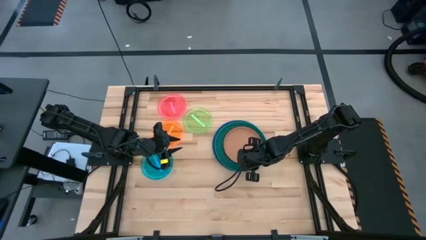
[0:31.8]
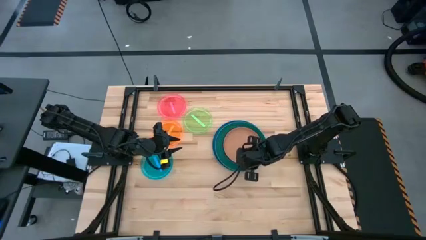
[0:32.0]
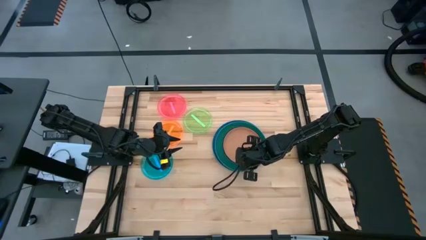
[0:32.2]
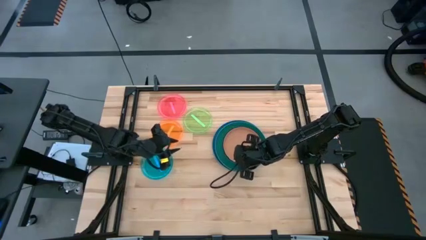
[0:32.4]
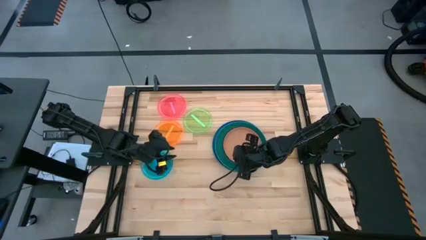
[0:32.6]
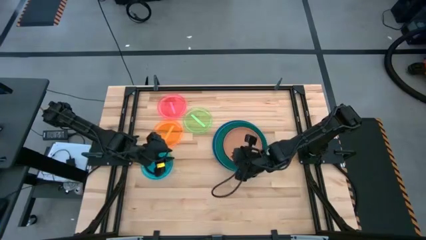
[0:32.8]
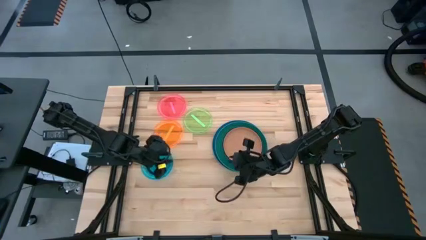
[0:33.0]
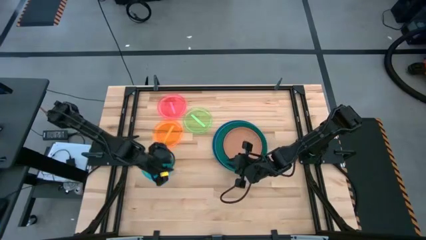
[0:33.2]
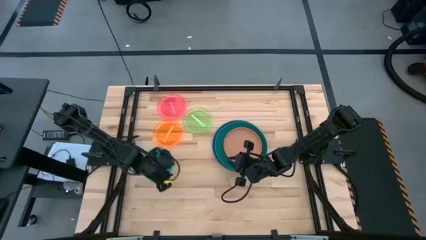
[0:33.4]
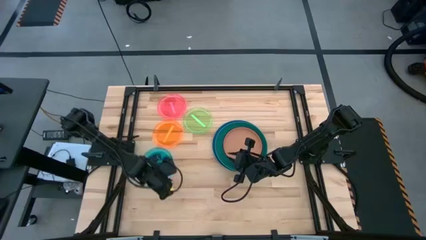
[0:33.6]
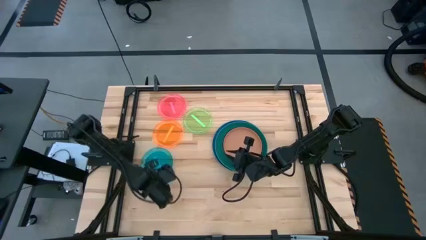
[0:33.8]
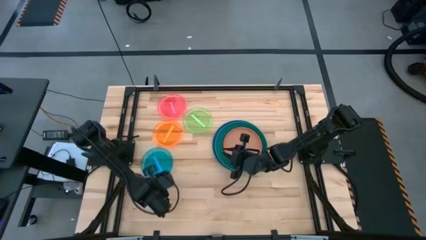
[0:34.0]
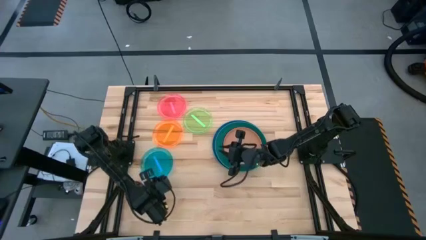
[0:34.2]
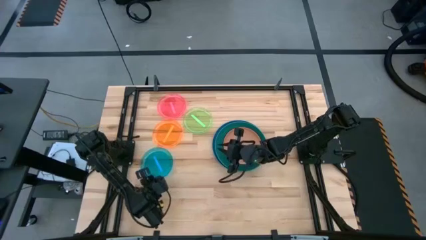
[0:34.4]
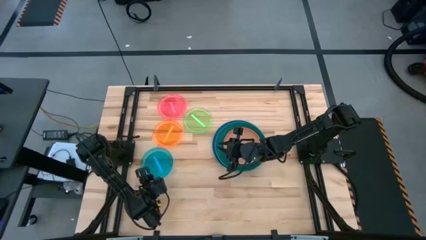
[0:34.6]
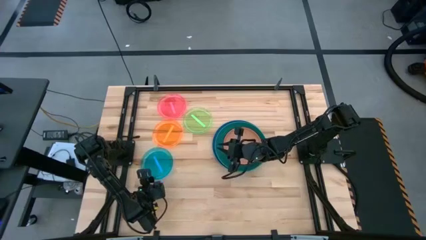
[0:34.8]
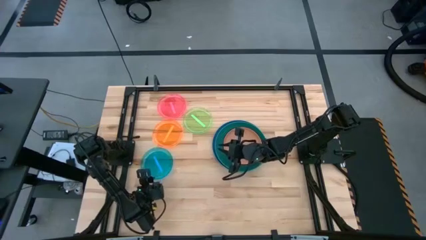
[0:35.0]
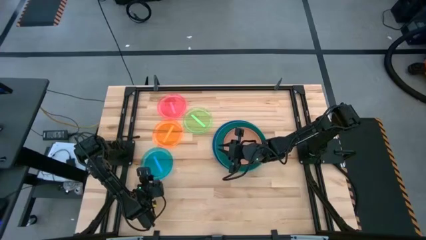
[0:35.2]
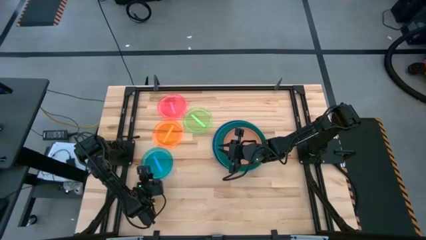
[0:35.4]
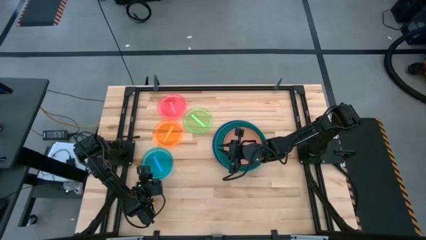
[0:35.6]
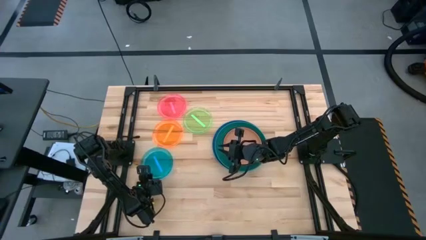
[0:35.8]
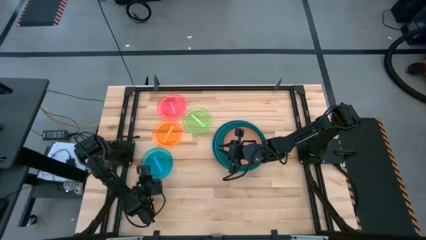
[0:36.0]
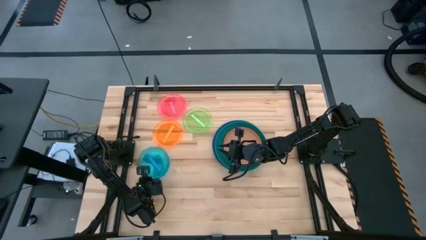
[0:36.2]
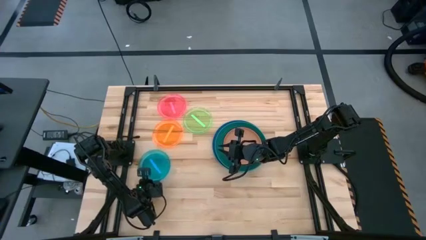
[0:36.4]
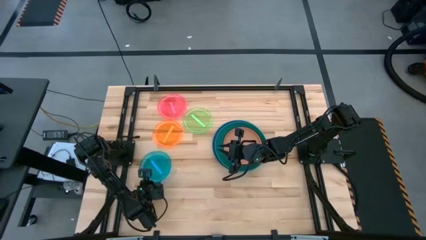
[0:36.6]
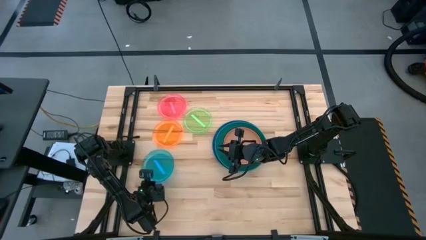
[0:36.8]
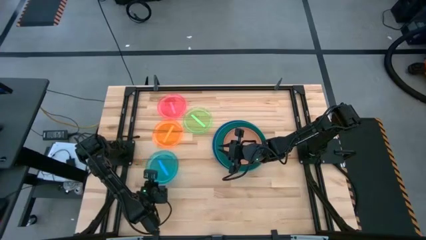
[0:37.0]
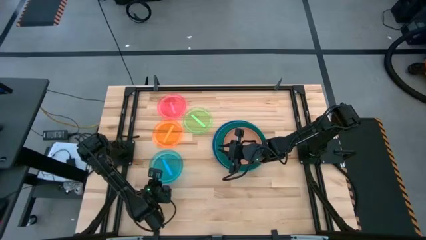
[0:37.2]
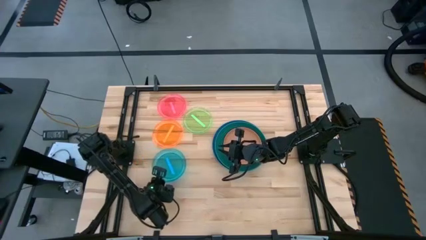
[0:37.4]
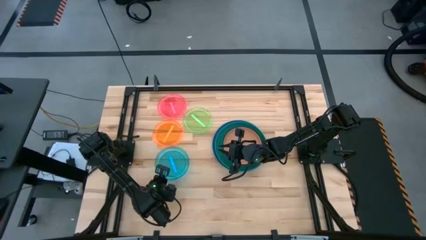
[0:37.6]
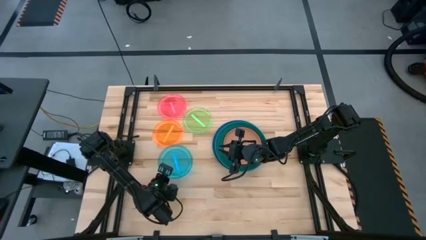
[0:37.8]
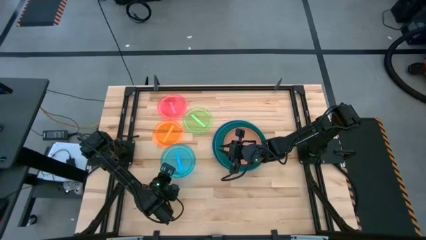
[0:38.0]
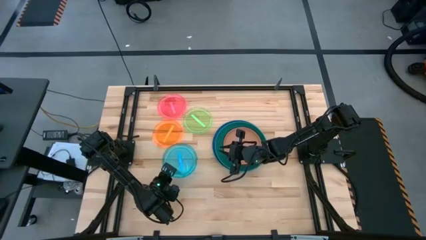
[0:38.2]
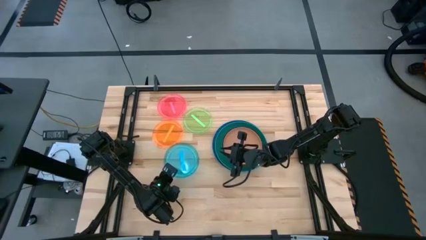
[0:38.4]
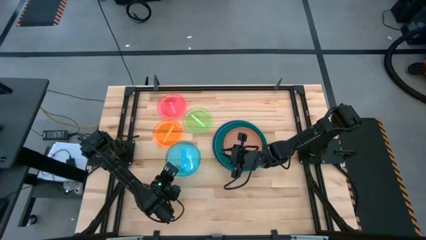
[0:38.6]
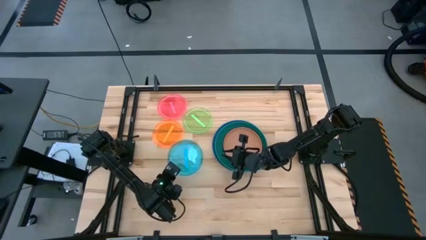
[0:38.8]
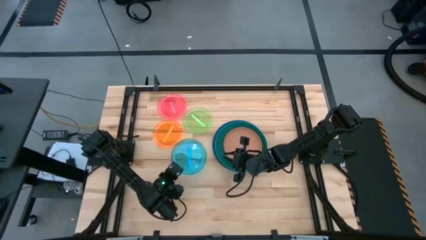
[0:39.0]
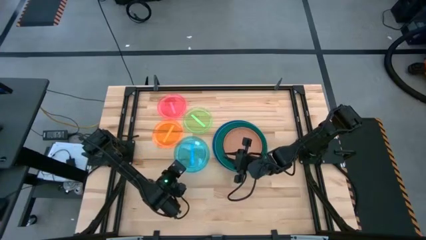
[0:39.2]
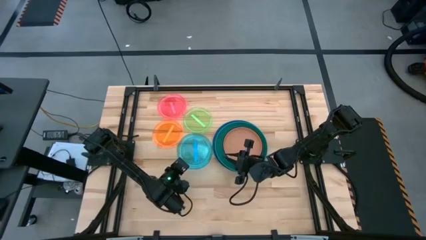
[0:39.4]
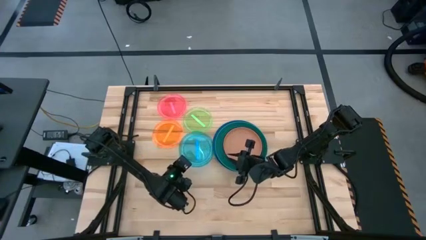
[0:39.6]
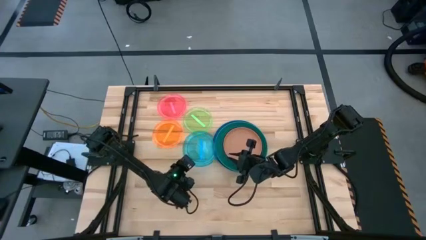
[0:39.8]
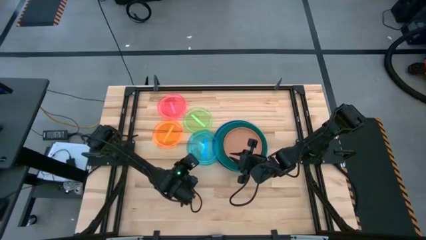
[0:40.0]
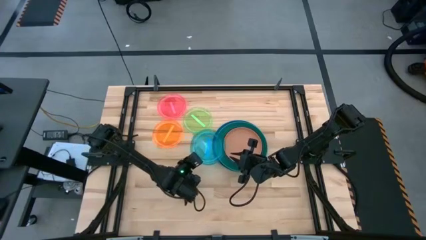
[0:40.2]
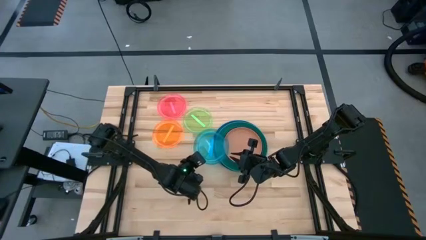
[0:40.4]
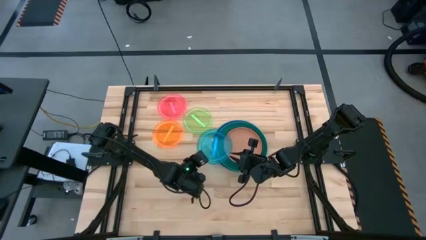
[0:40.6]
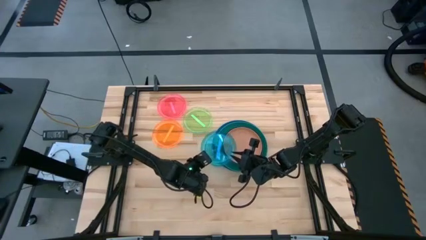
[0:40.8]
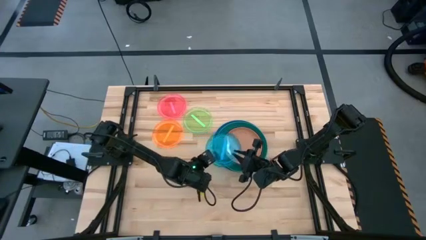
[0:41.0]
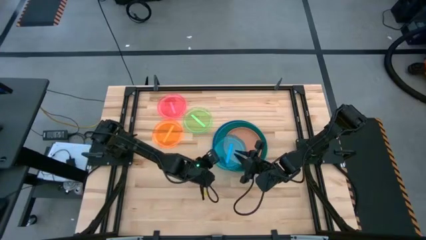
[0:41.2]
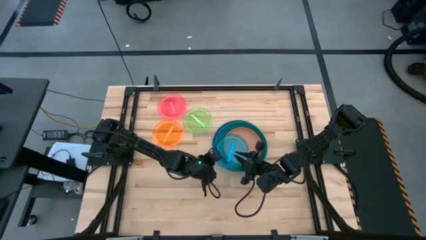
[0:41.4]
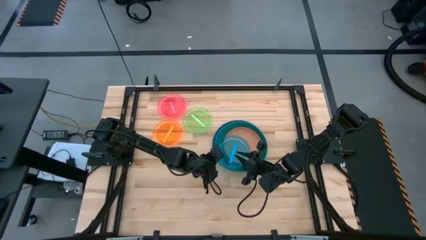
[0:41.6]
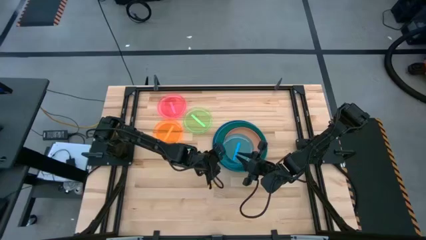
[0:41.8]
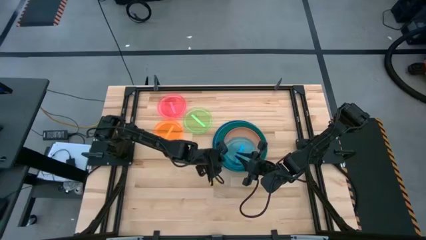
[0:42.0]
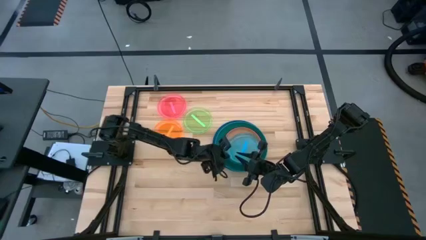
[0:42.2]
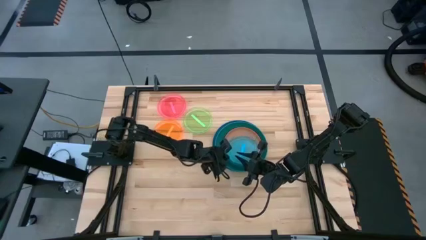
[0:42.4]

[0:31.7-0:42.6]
Task: Stack plastic plates
Stack the light blue plate on top of the brown plate
